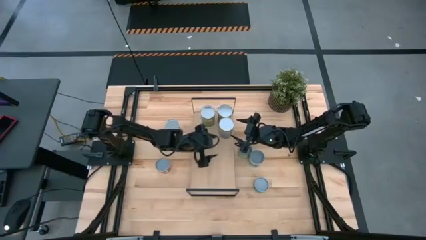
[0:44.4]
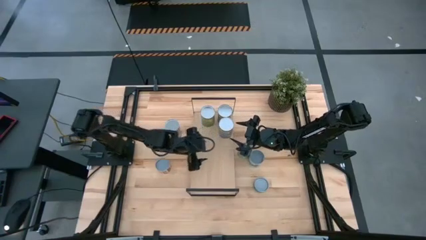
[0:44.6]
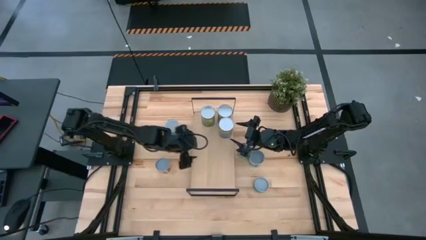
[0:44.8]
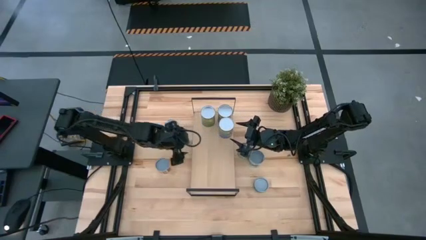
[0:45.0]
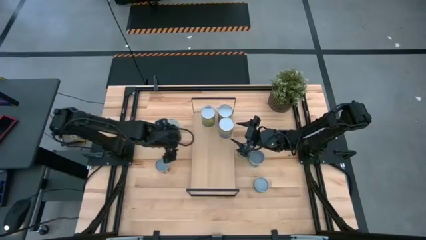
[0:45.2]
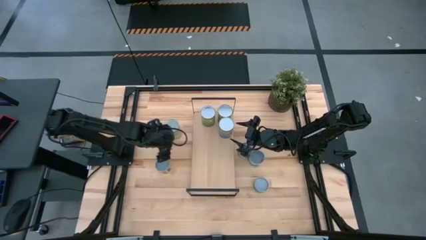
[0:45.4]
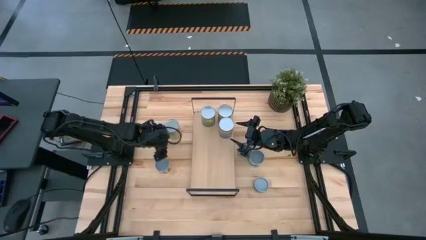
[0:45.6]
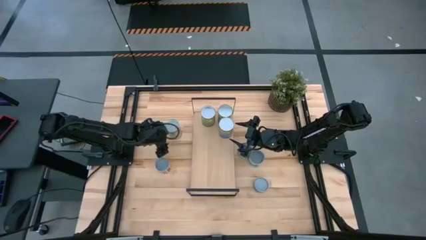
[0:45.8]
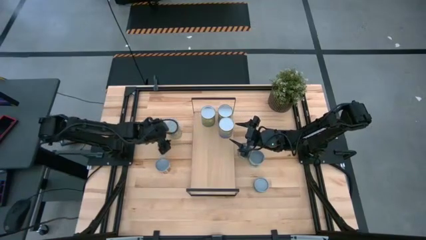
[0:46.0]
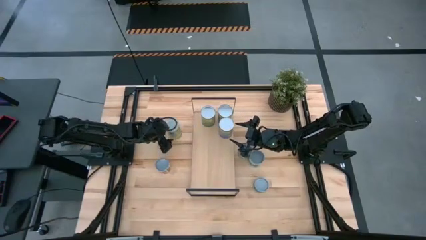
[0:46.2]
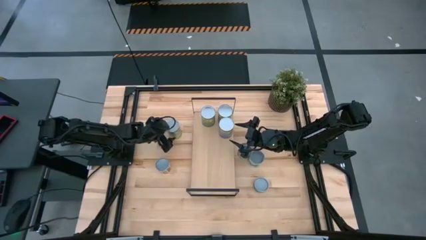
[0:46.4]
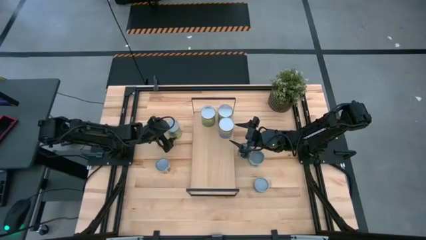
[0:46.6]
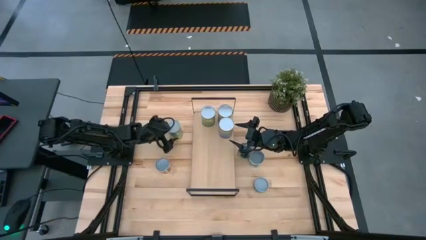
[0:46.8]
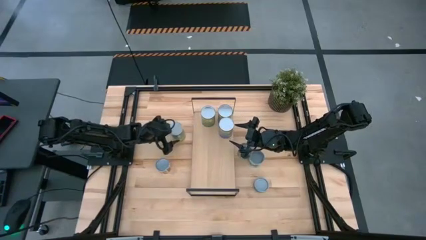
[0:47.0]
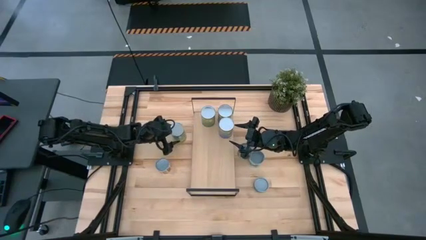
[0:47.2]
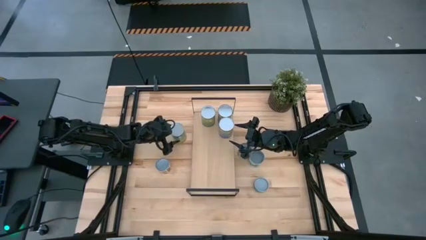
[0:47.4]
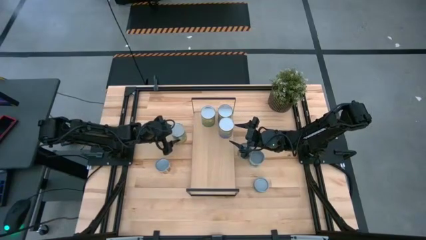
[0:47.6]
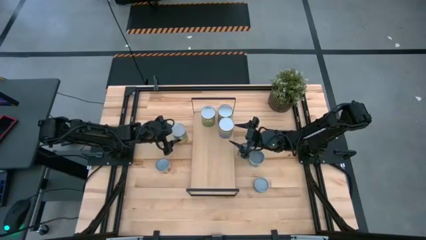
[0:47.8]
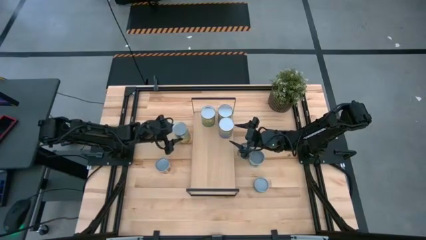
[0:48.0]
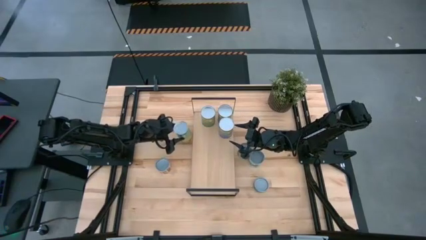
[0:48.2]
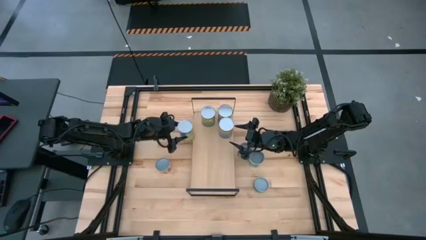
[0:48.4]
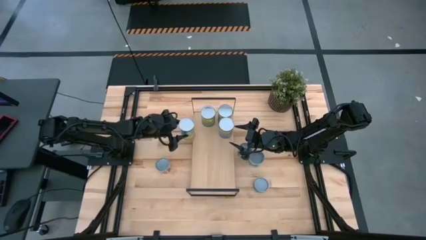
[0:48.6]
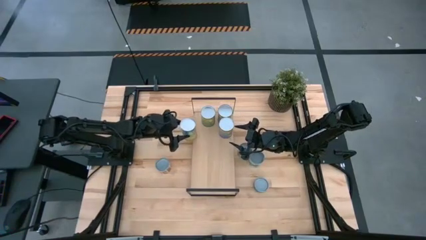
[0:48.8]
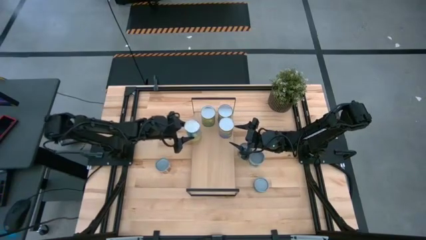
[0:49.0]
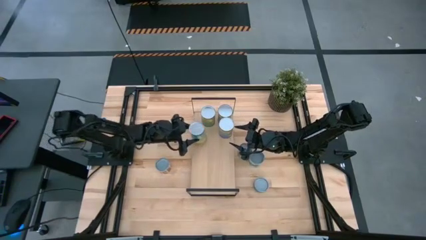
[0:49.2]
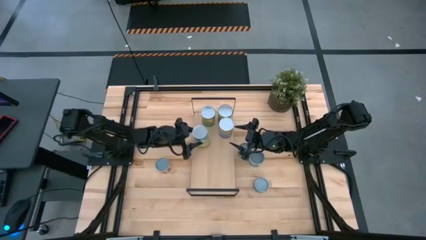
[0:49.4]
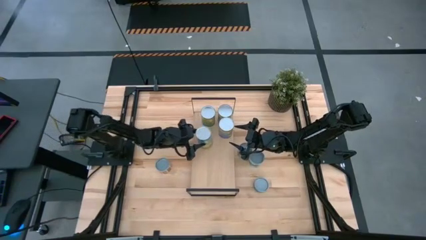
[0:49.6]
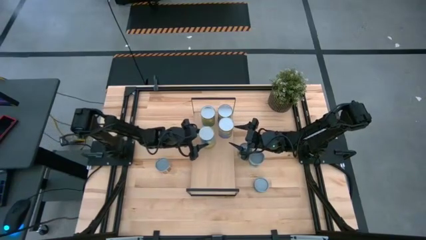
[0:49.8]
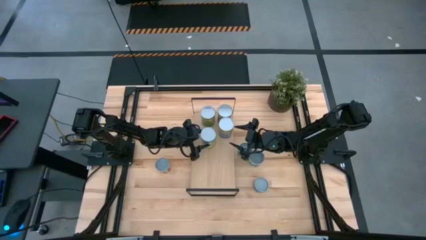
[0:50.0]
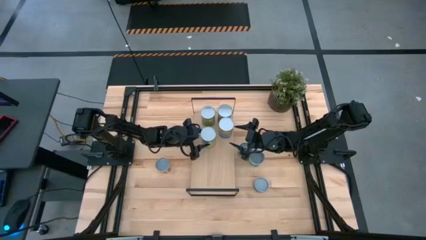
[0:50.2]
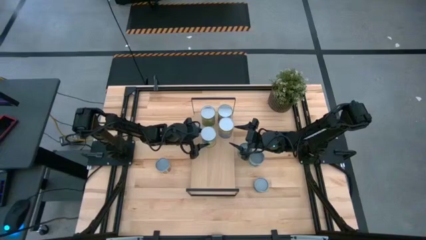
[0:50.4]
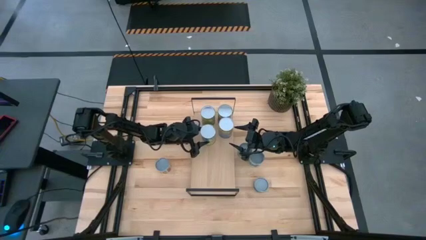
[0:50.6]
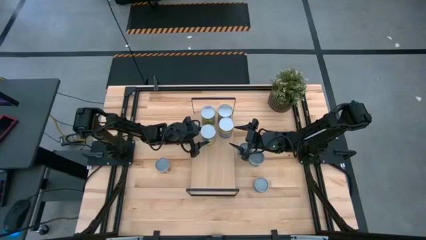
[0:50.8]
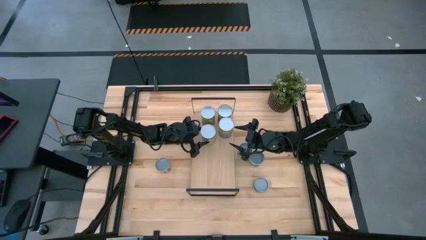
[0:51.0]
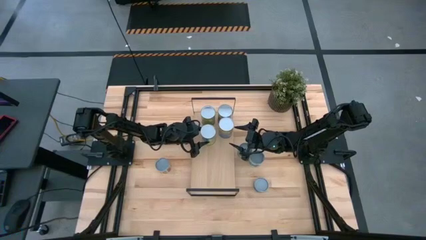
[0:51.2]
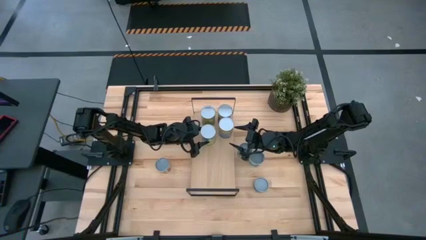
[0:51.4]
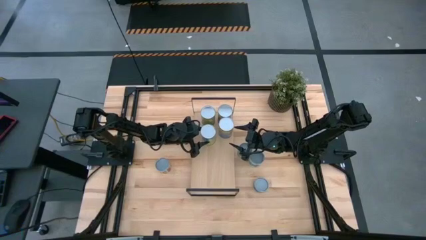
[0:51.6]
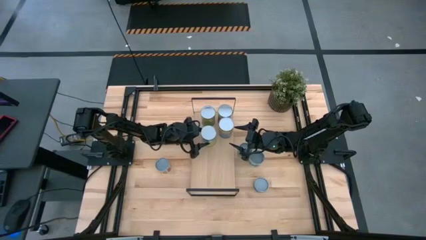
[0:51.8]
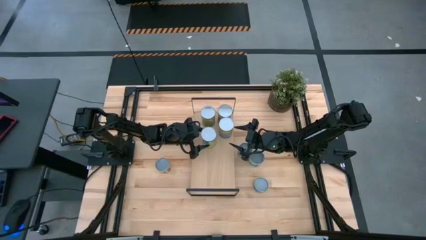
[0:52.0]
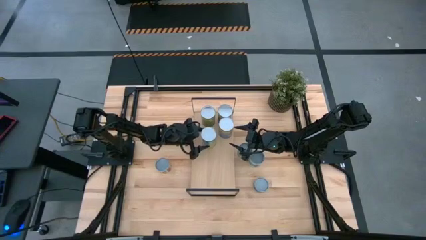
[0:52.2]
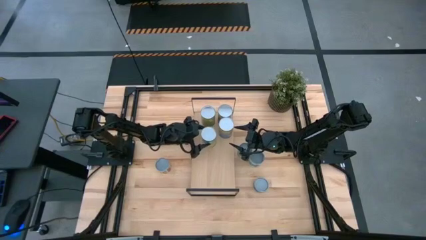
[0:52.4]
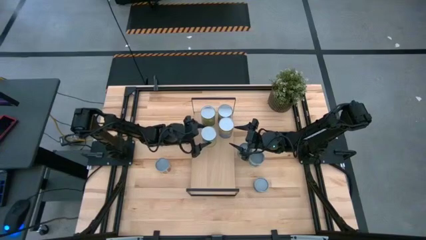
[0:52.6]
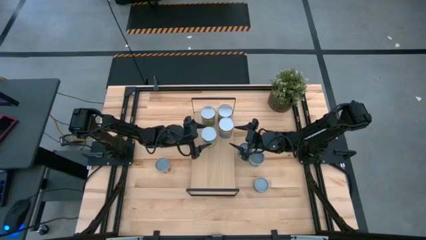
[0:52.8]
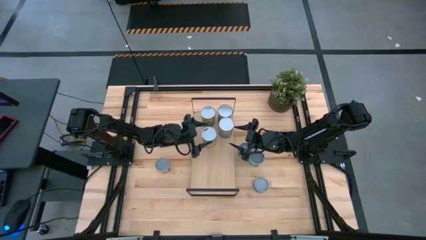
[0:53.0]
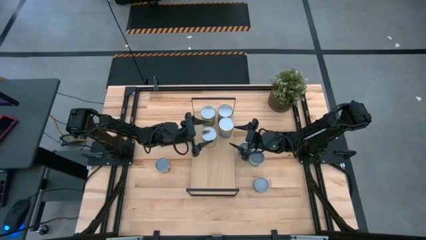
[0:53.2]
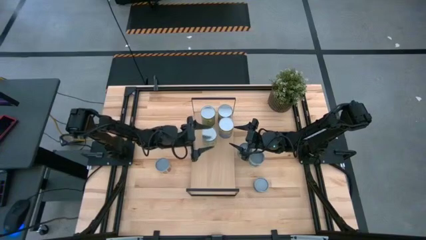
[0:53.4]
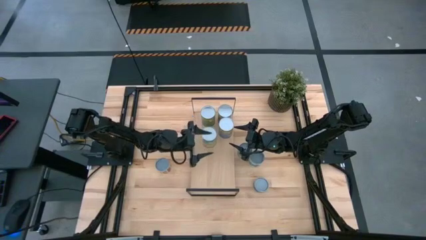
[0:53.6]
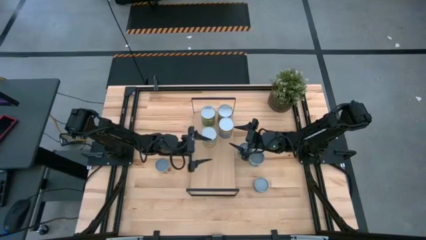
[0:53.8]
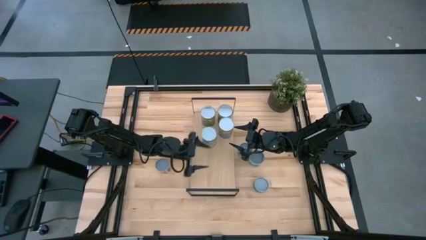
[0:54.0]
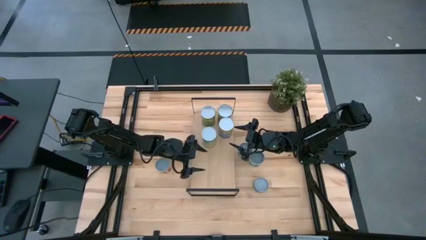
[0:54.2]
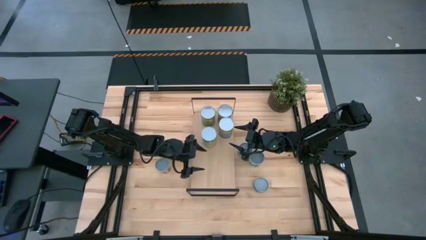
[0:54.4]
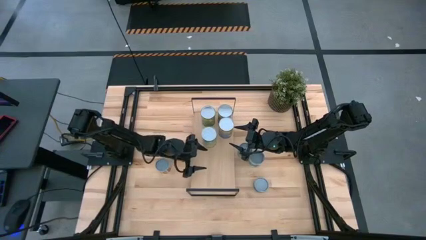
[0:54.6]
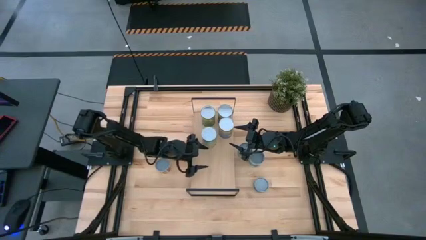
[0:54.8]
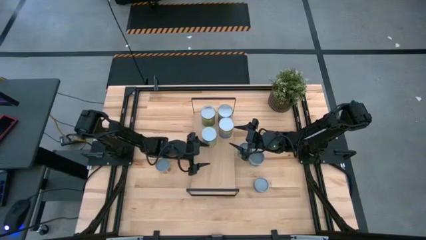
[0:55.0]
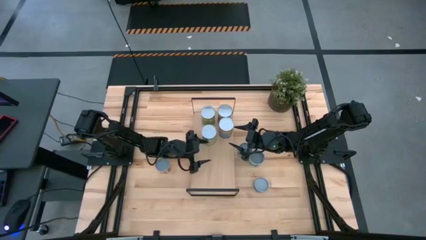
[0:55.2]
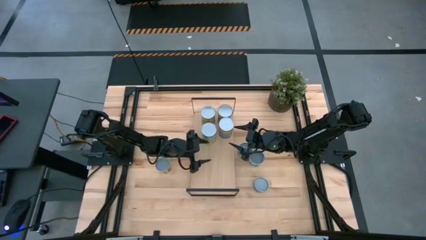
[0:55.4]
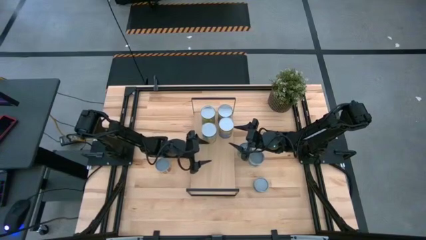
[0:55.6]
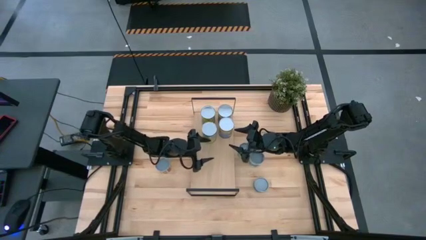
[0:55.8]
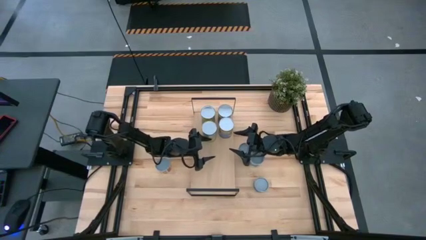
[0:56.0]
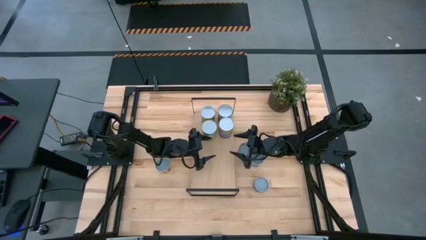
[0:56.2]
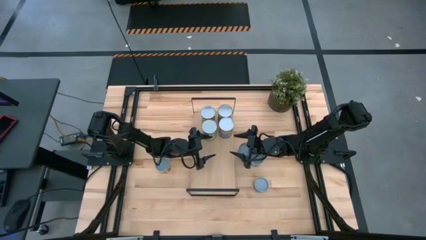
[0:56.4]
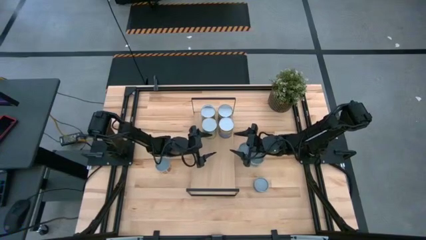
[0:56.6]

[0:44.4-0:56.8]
Task: Pick and place cans onto a shelf
Put the canned carrots on the shelf

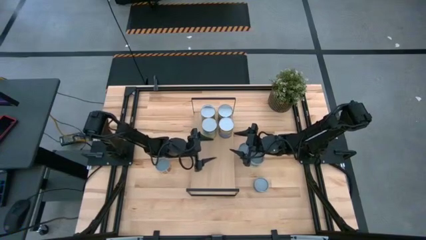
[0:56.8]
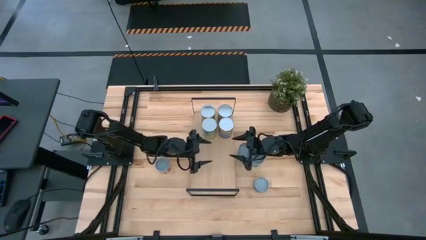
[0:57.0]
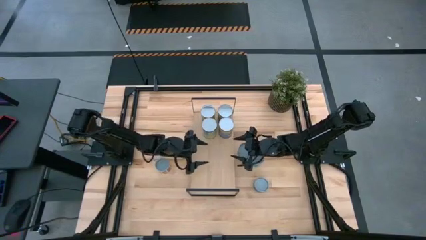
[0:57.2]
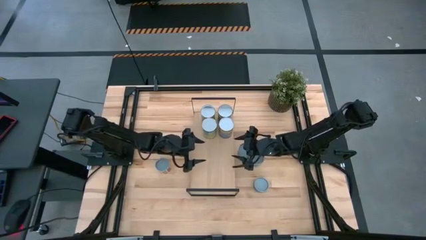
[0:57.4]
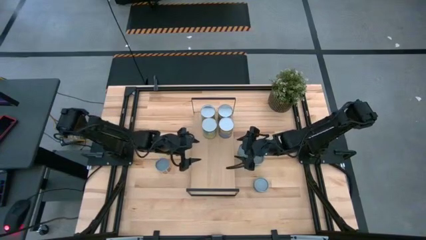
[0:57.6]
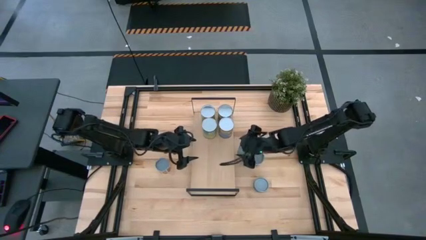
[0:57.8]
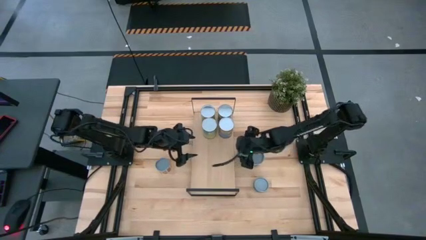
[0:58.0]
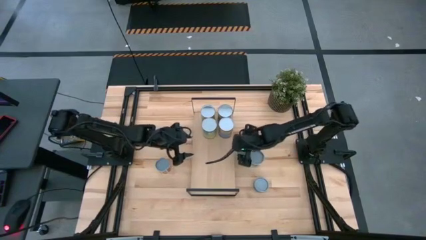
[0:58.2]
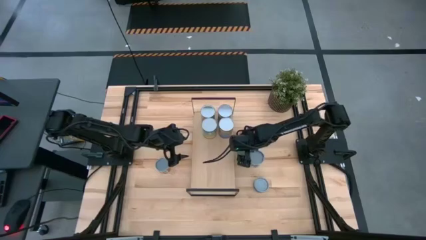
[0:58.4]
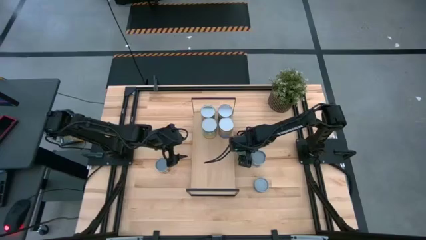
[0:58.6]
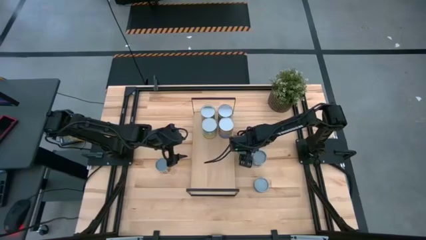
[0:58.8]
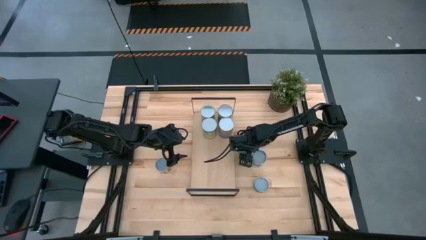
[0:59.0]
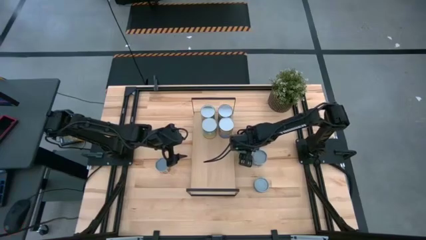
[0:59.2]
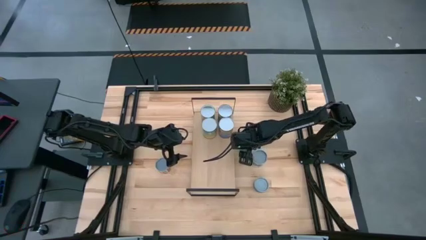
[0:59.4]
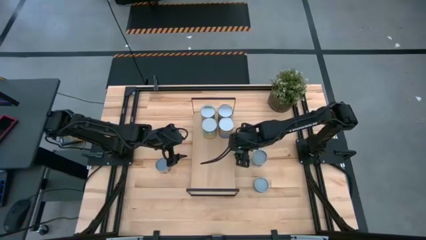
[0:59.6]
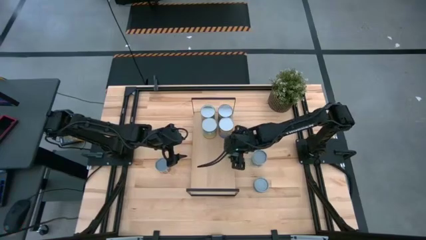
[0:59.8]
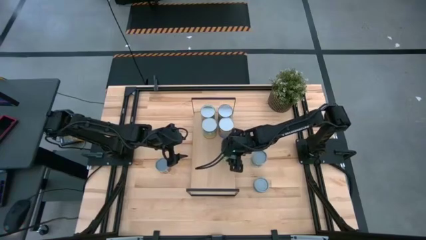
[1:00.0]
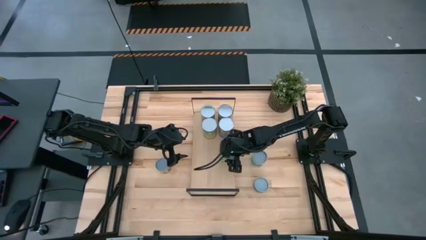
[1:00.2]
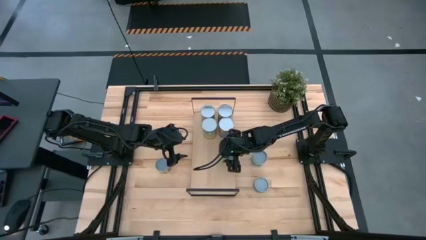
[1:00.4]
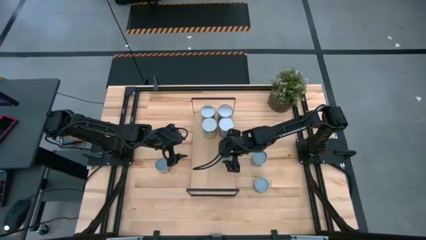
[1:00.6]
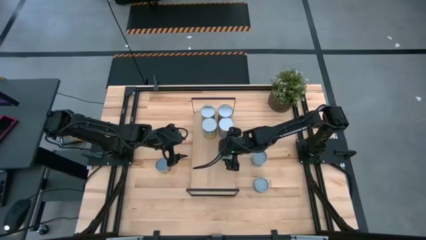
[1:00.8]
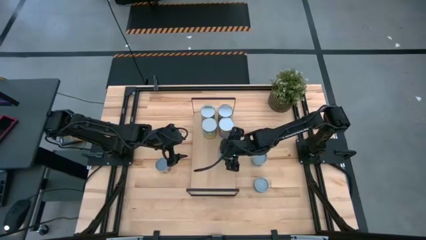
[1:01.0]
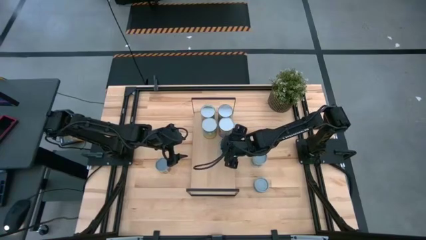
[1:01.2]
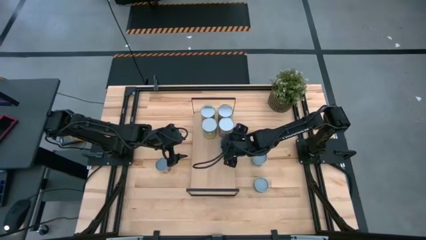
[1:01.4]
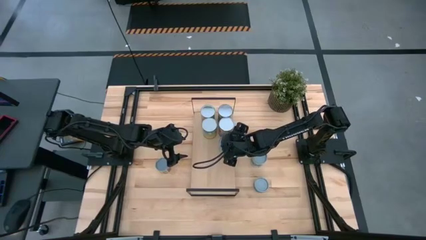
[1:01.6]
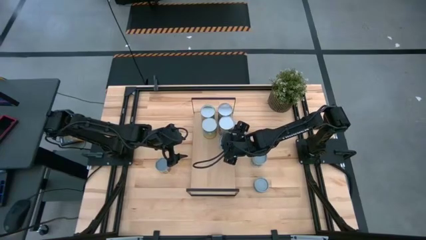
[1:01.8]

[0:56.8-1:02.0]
Put the canned green peas on the shelf
